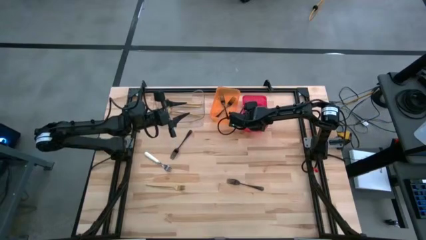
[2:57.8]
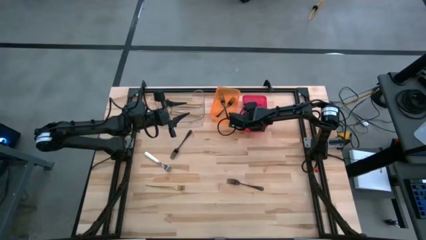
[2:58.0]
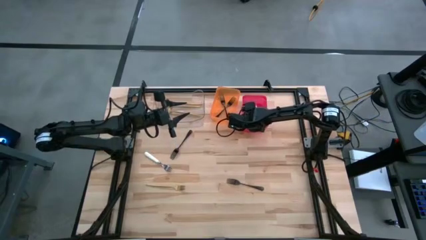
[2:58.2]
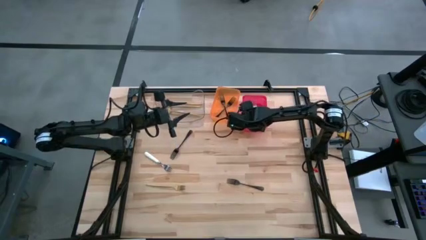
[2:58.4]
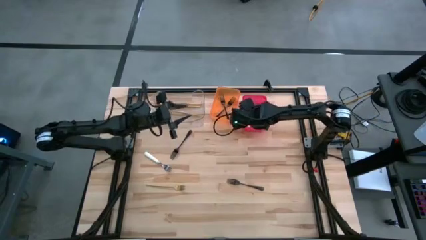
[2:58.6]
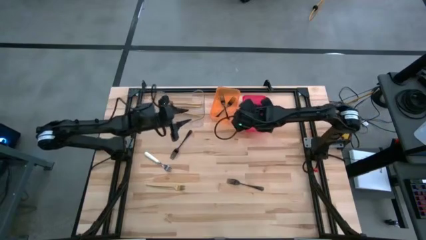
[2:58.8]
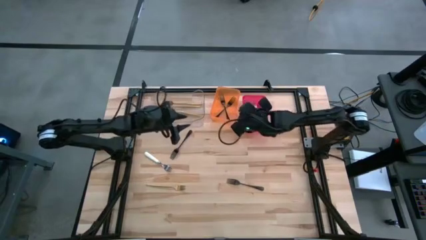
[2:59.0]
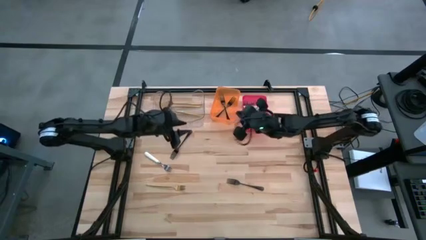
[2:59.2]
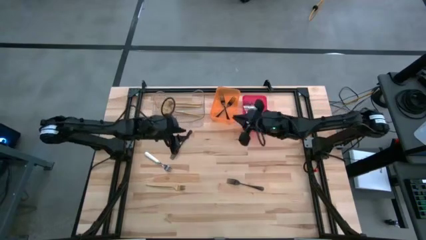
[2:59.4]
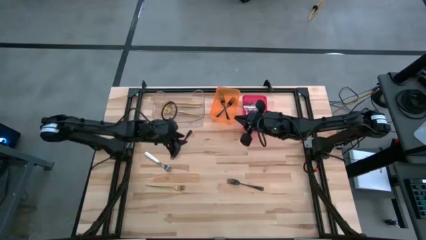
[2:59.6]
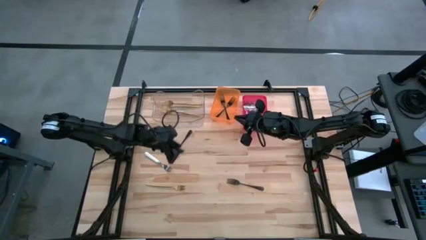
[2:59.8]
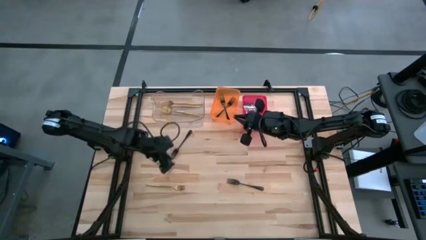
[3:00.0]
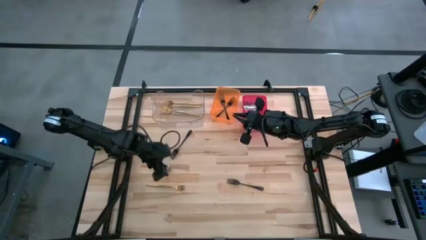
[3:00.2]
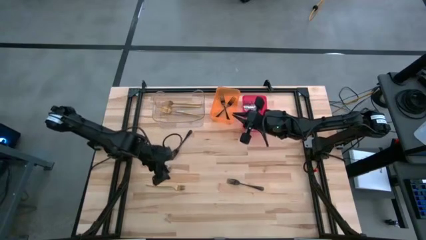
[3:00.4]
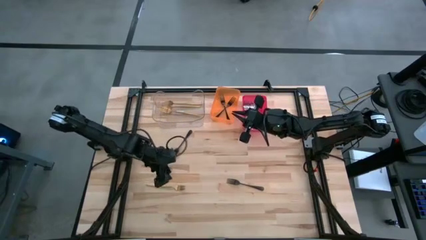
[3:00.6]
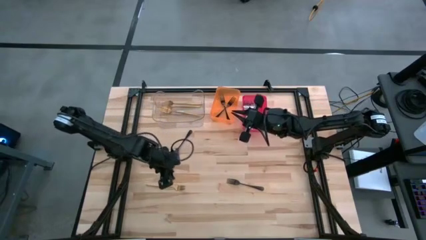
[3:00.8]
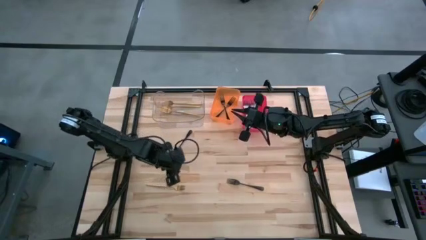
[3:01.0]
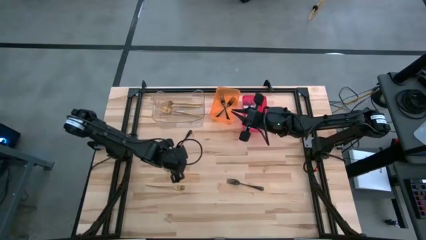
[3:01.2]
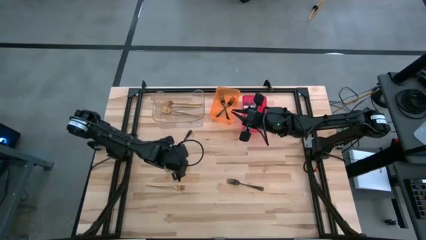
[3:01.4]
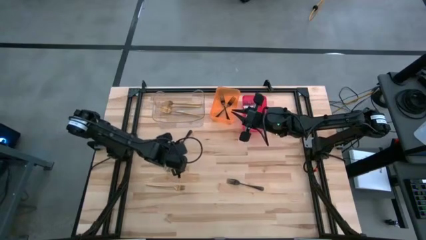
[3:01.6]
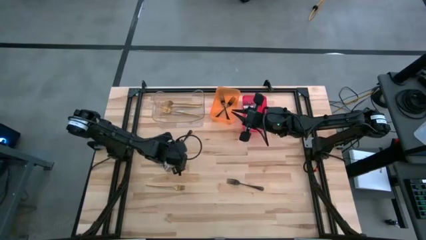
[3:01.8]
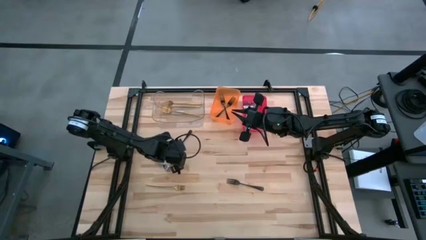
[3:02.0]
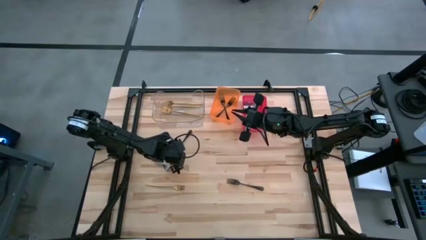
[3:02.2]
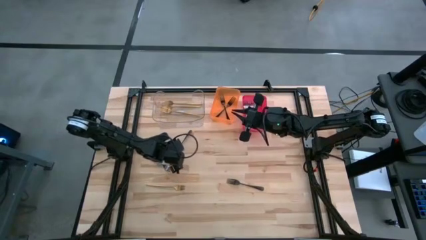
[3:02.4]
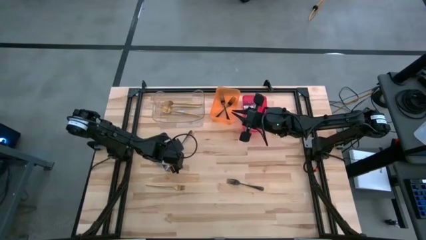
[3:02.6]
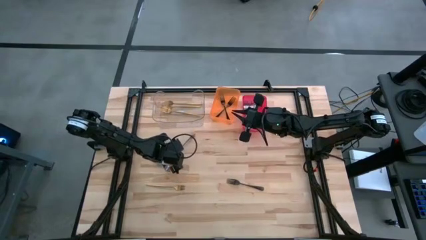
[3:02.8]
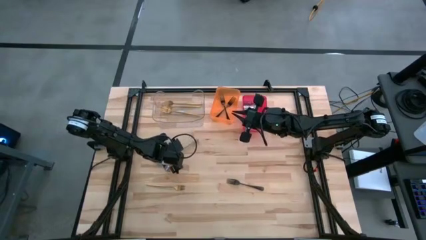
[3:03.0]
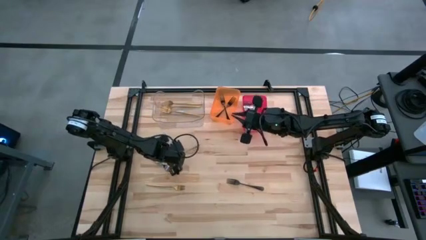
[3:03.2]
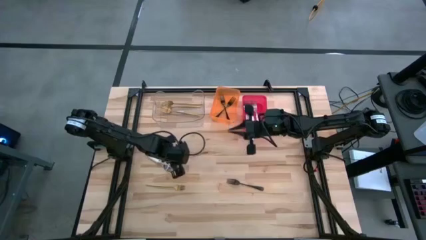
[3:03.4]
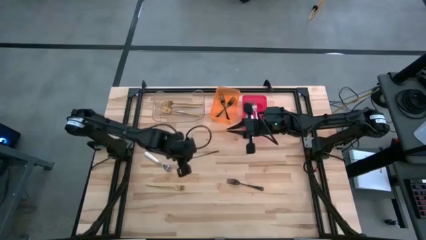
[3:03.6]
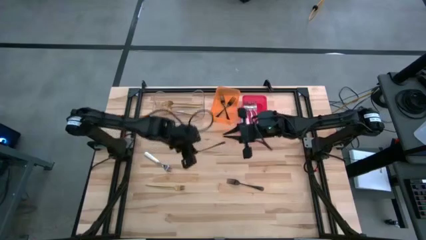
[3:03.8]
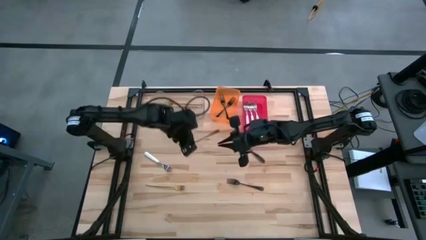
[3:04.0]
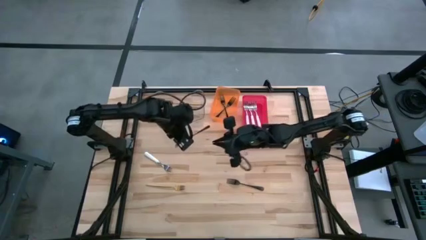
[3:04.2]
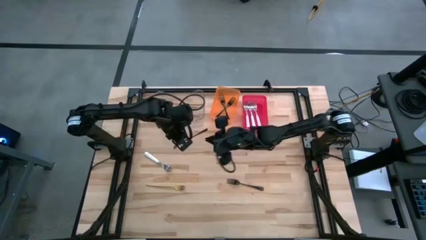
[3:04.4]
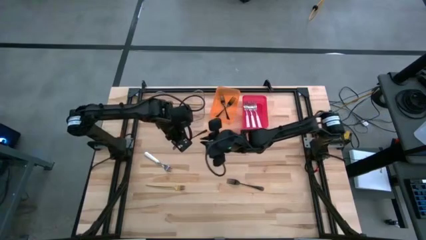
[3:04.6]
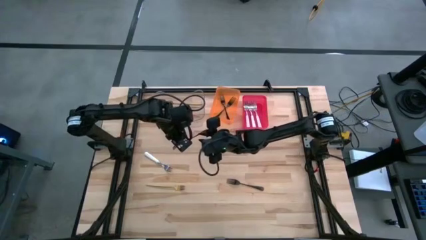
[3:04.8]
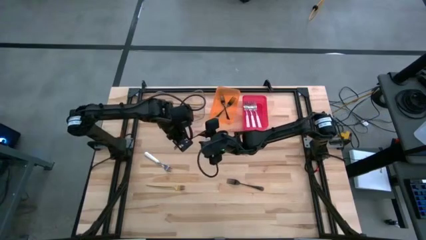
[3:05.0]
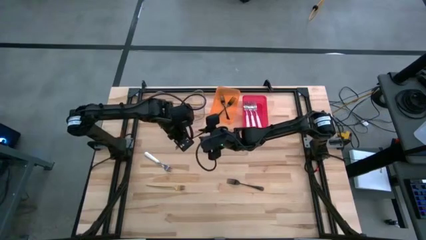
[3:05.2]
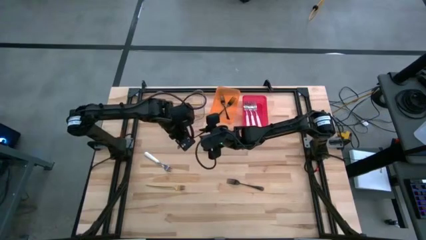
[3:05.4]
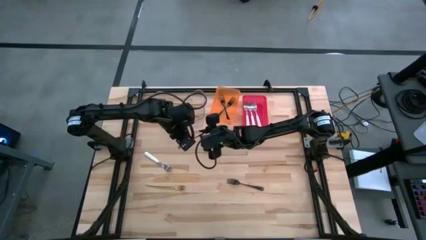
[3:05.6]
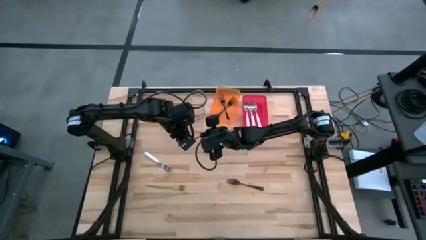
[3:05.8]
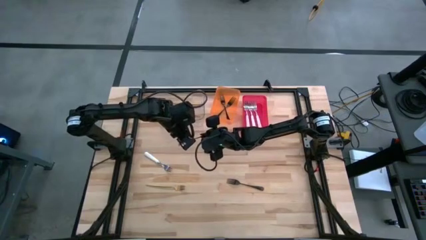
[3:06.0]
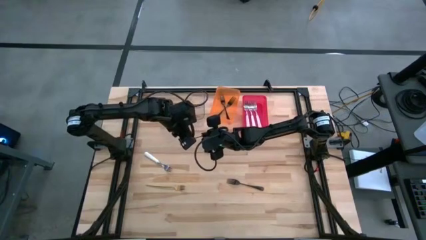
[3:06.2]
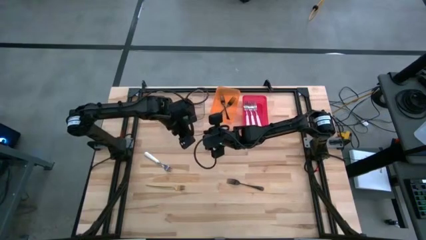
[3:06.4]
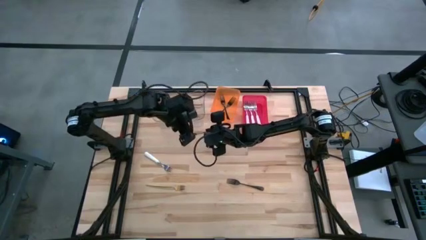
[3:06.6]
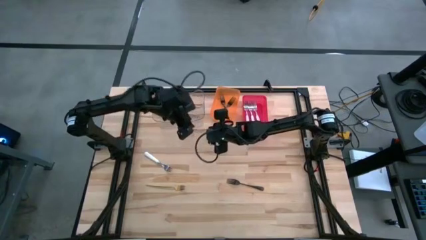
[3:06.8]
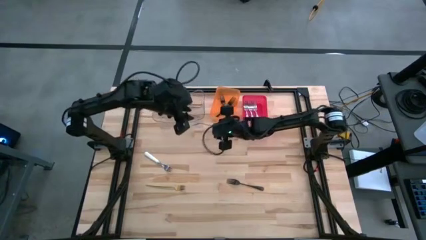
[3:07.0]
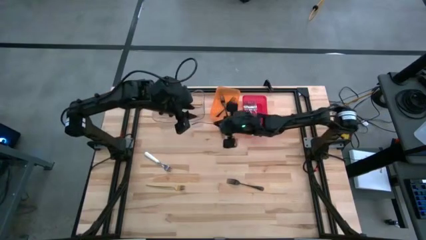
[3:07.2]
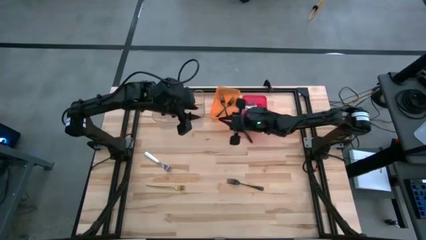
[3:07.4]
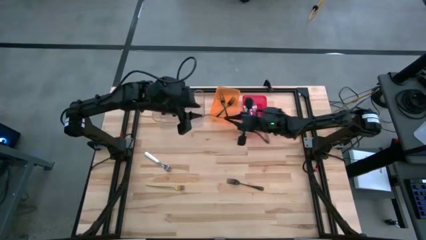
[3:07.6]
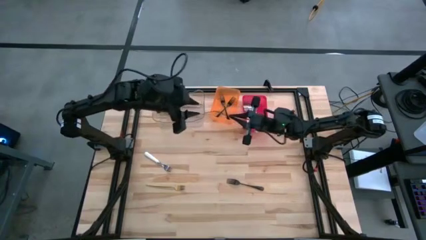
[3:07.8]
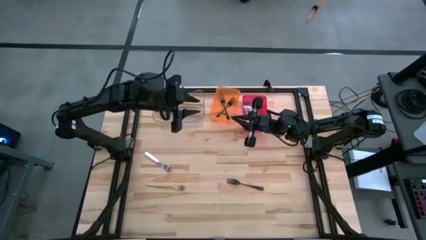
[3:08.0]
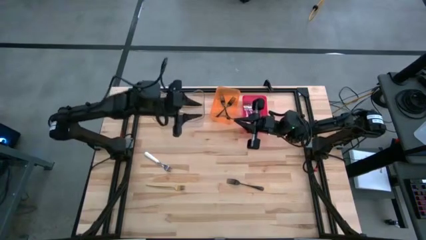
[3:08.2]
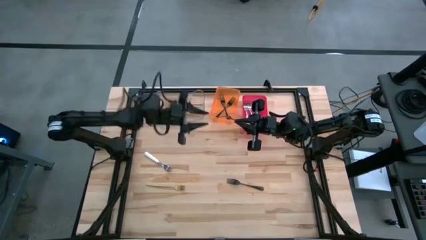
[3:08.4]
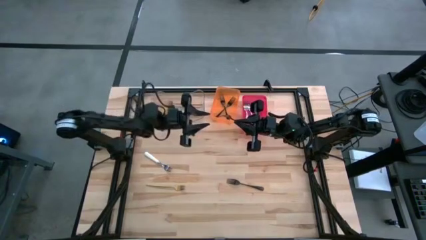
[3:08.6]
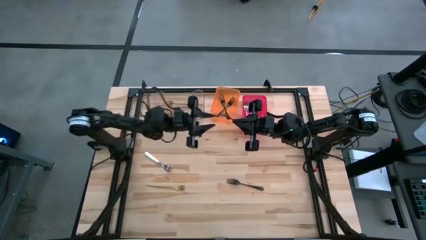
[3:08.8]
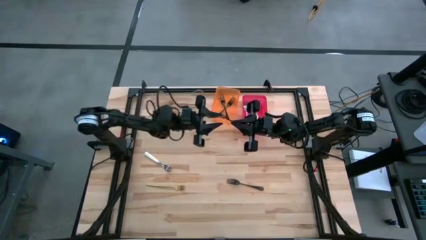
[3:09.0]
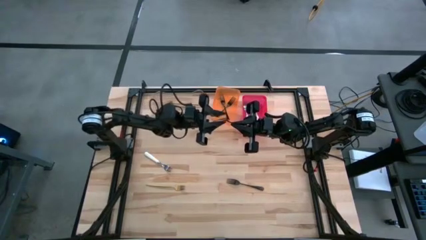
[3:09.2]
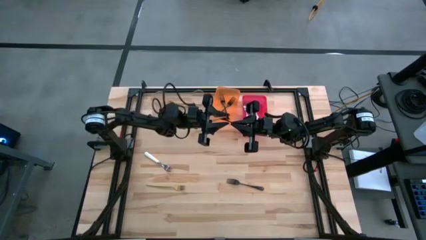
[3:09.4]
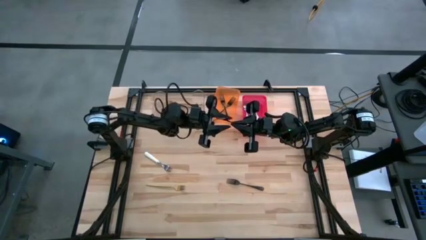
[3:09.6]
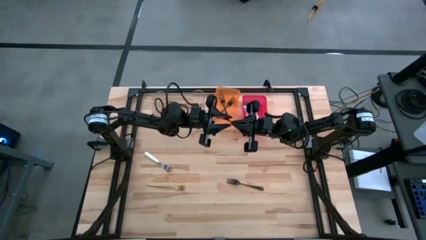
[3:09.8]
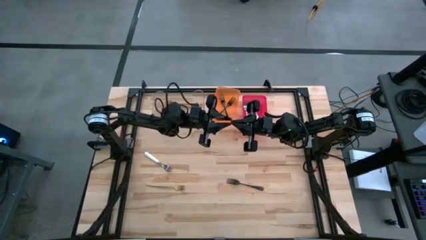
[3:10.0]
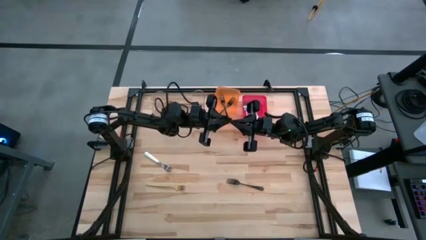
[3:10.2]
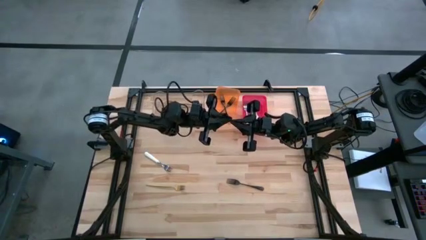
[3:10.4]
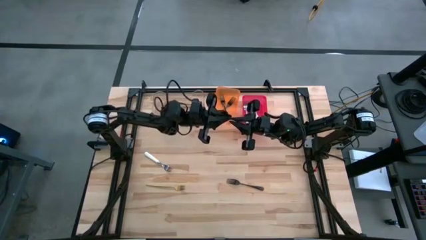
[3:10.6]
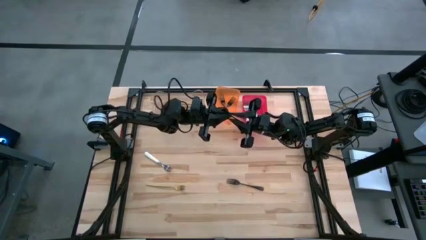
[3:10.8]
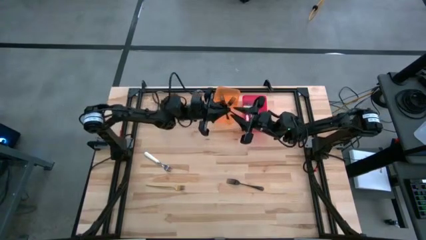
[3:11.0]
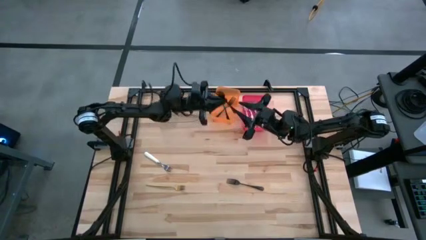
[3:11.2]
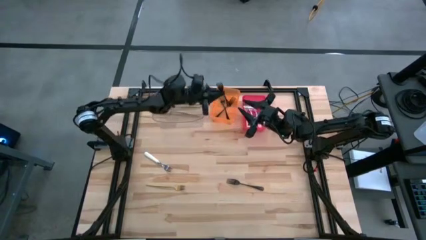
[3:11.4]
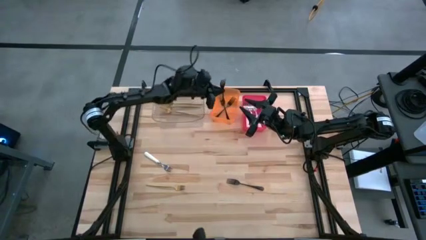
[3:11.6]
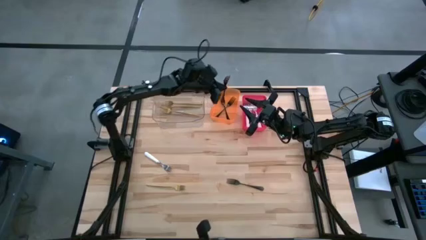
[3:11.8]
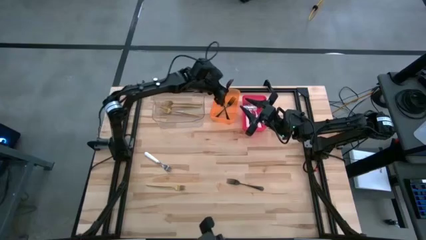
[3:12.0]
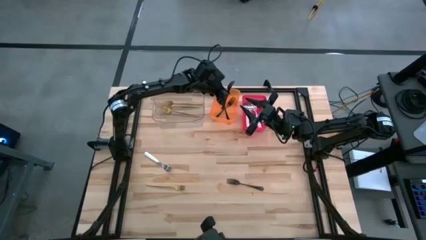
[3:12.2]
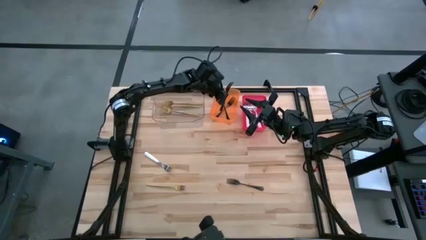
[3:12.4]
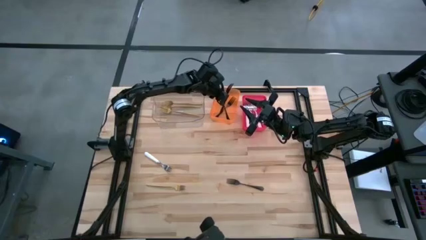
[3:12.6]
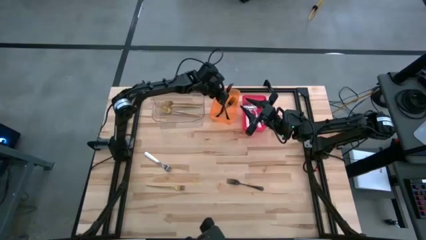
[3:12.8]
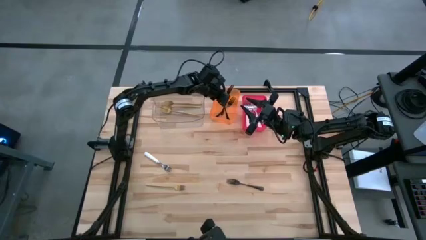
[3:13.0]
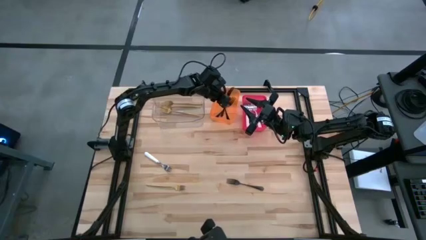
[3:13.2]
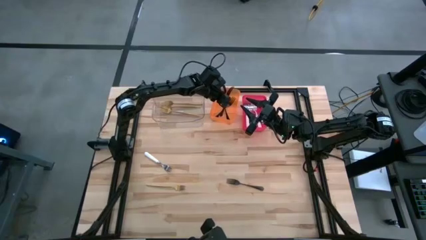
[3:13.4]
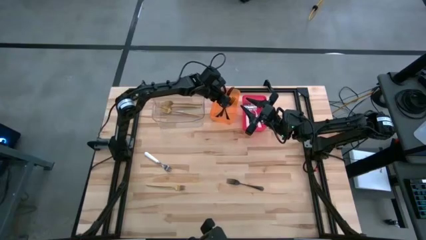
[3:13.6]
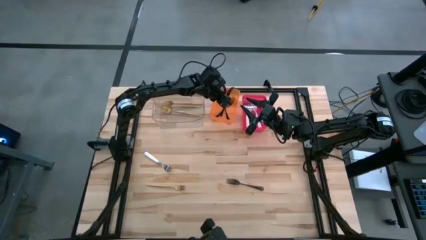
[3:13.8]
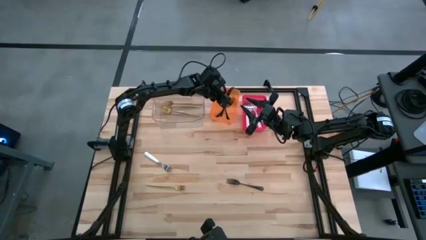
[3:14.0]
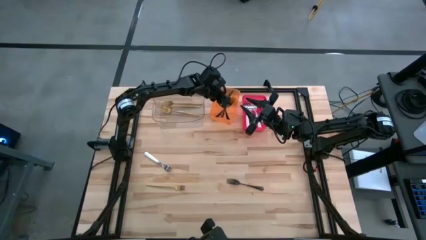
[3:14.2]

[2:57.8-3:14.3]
Task: Sort silverware by color (type)
Put the black fork into the orange bin
